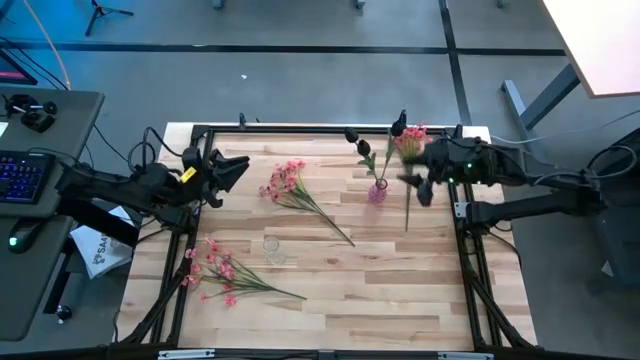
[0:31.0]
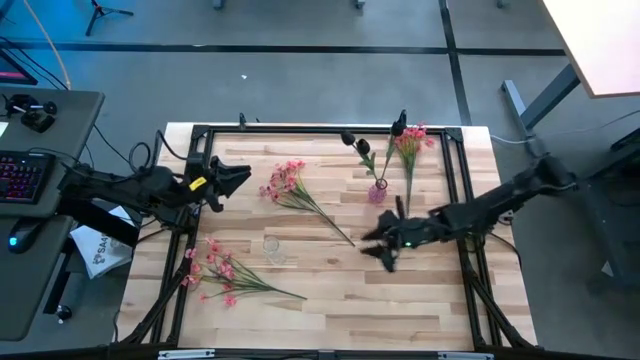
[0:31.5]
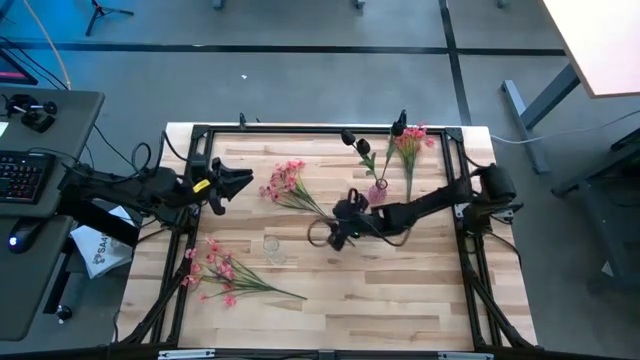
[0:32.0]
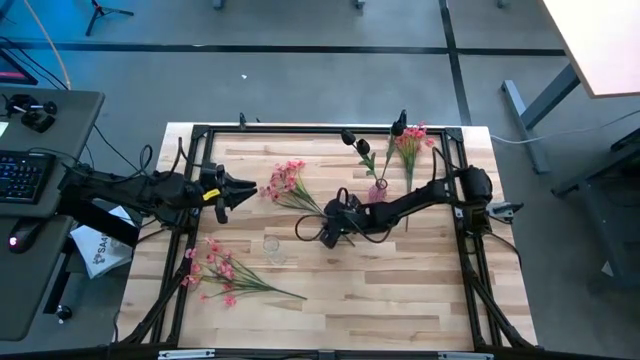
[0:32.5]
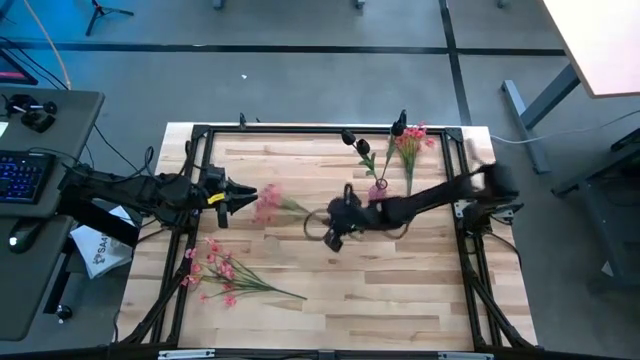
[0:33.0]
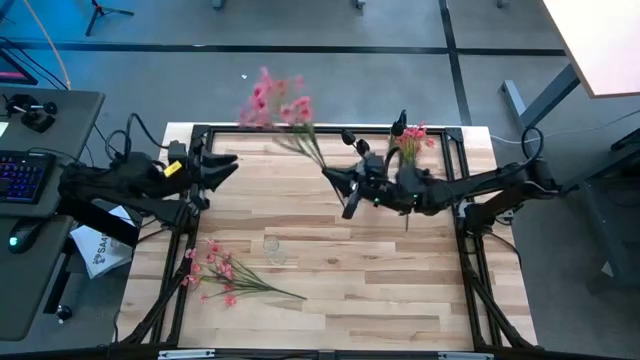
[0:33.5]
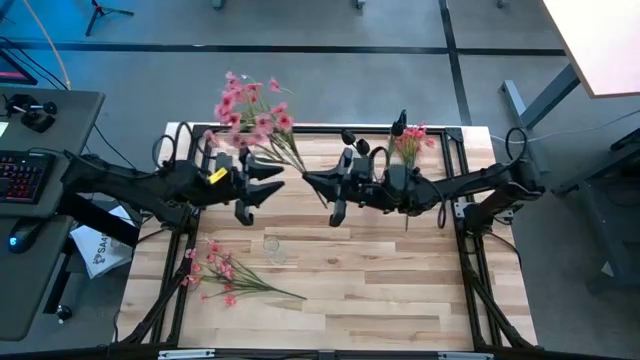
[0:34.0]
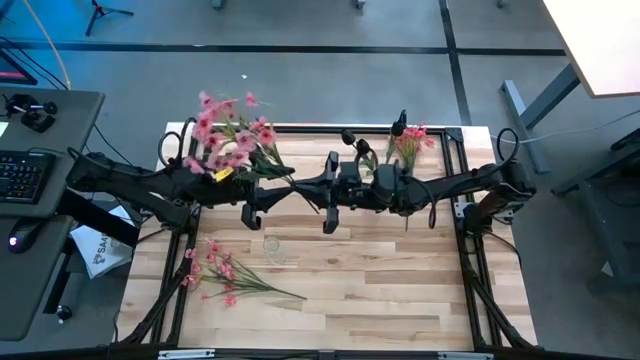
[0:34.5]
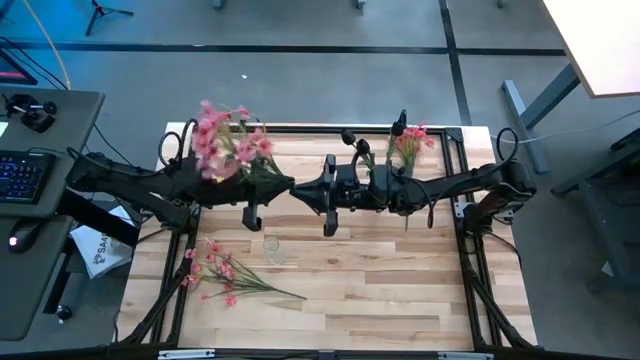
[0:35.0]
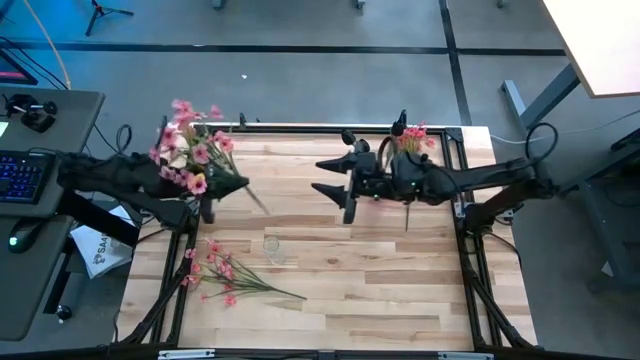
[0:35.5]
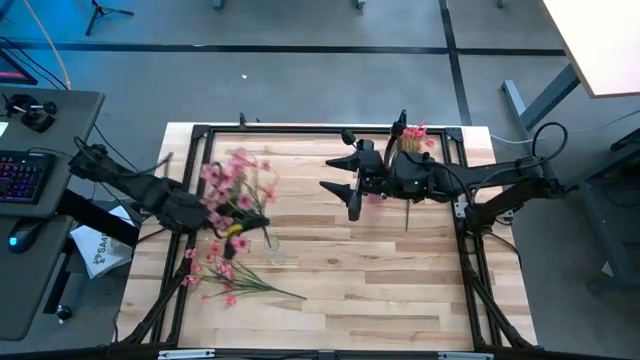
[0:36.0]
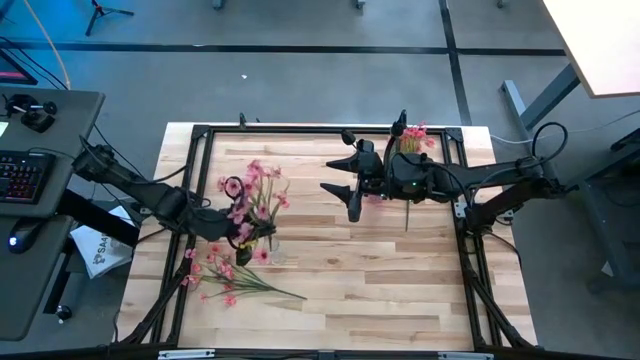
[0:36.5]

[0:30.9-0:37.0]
Task: Sort flowers into vase by color
Put the center pink flowers into the transparent vase

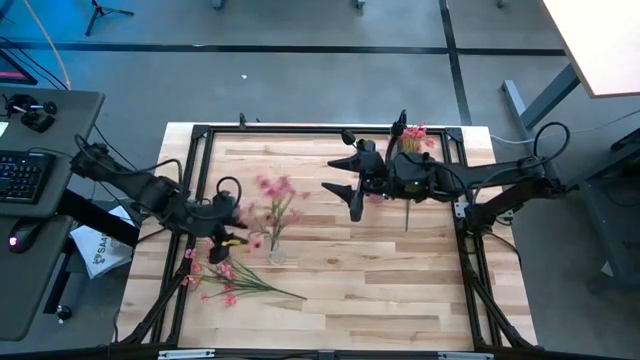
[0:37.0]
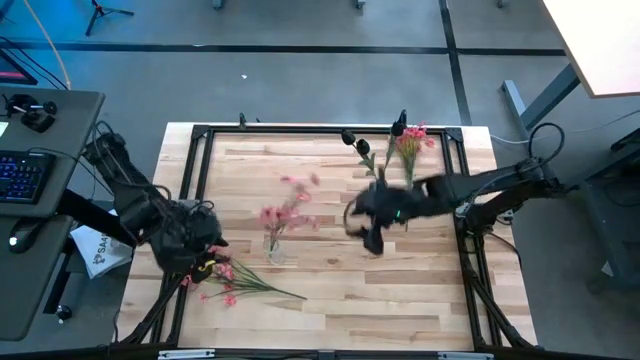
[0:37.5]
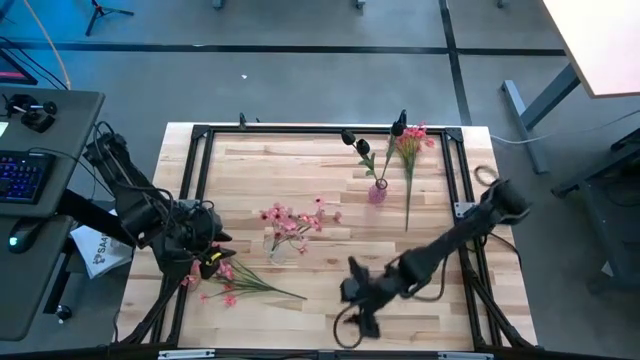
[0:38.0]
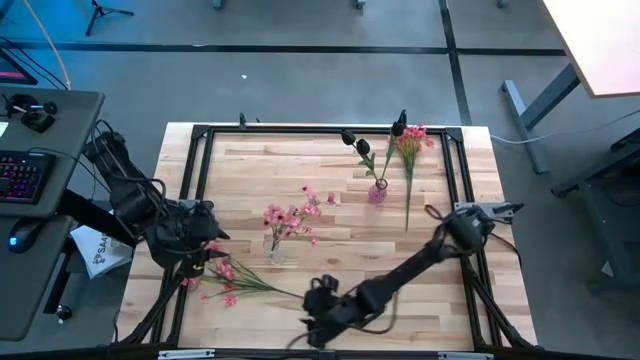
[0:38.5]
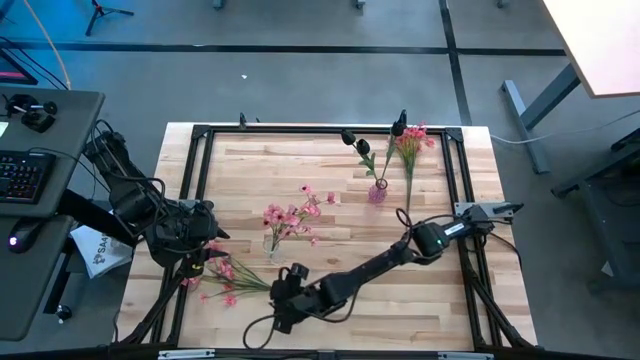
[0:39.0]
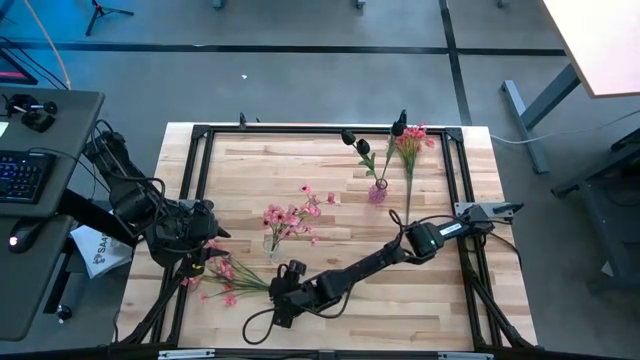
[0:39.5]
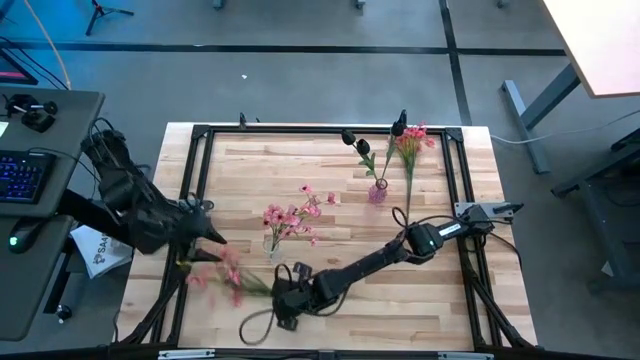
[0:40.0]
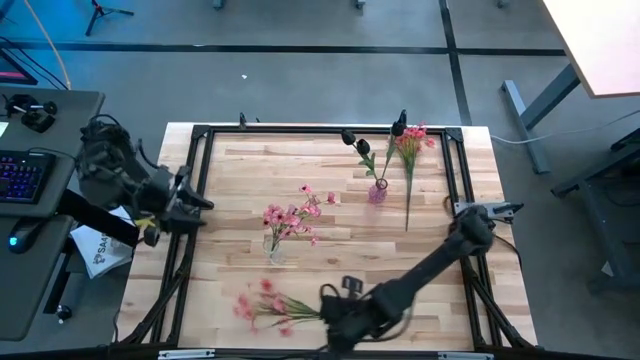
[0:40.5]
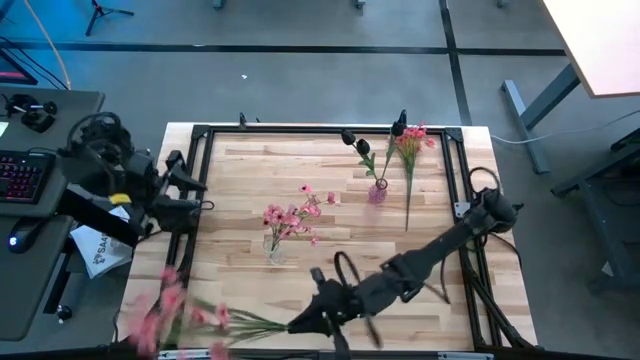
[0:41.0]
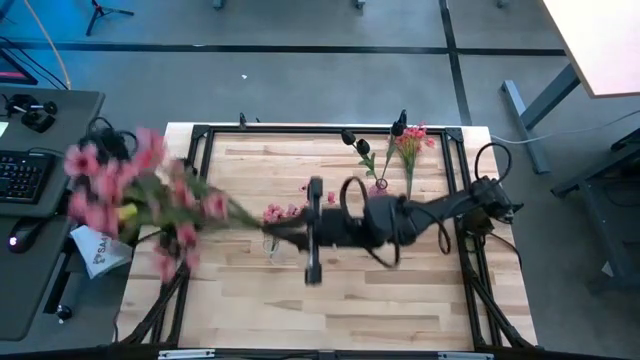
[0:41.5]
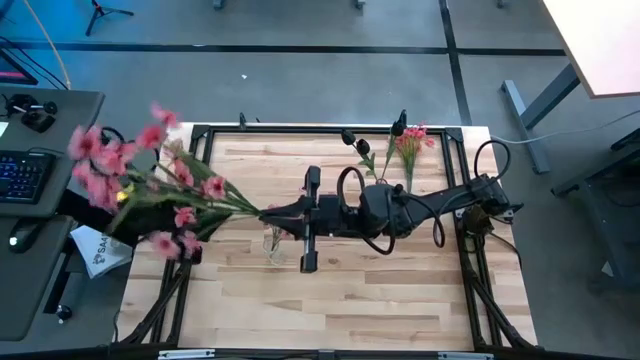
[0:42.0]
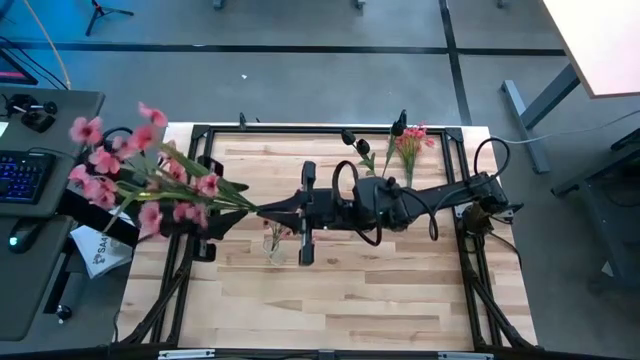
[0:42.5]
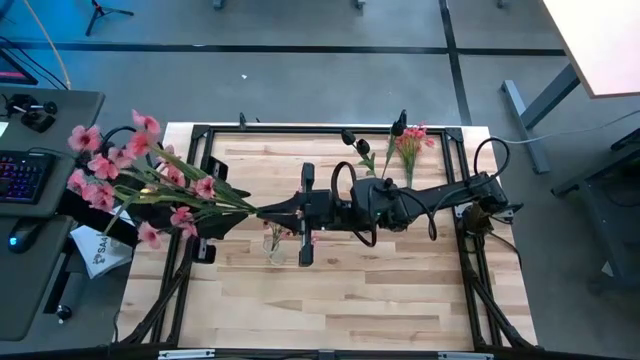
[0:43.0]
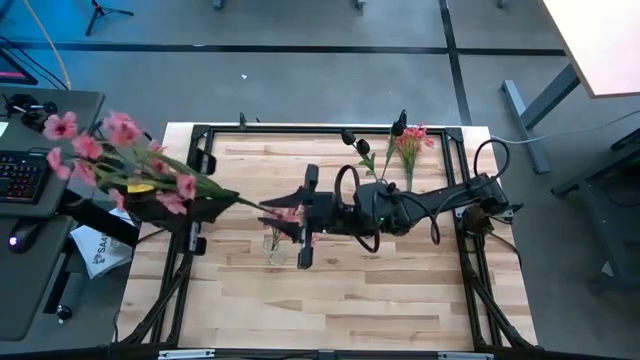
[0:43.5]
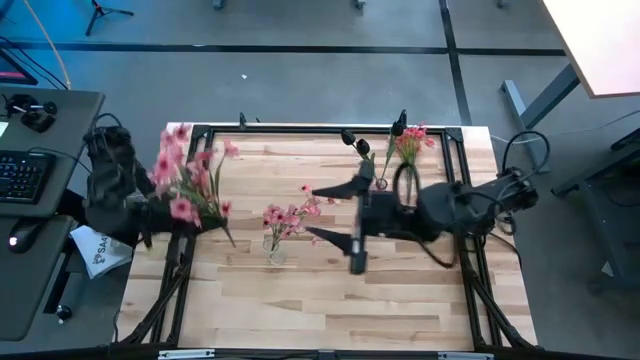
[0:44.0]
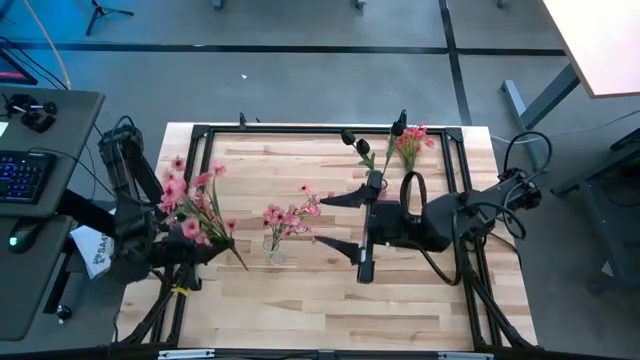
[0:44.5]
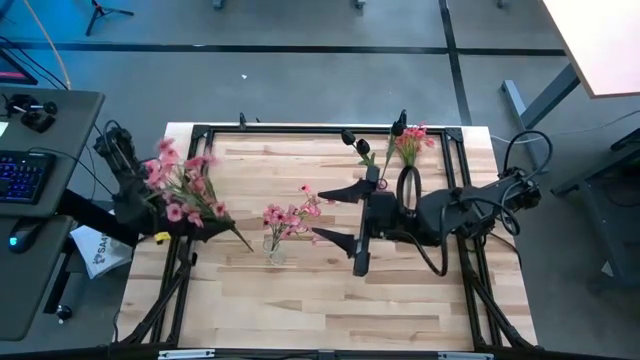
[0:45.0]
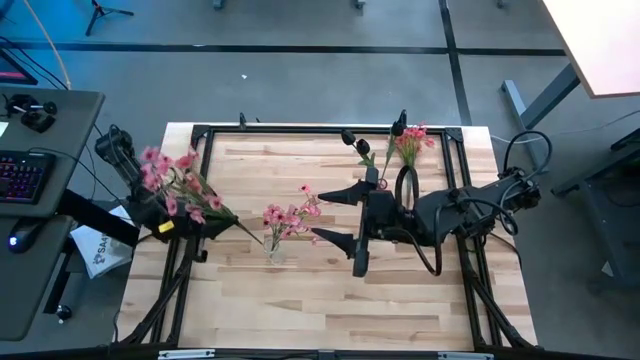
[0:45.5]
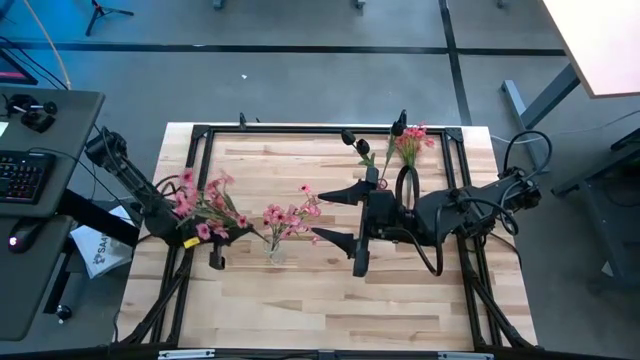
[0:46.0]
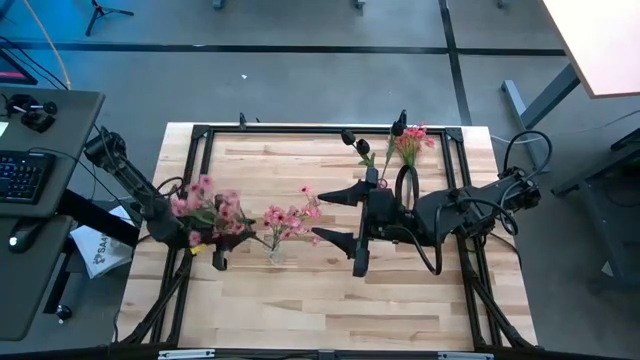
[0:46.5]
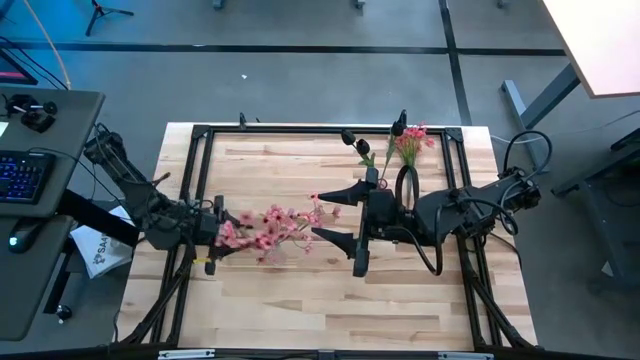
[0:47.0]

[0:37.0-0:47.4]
Put the bottom pink flowers into the transparent vase

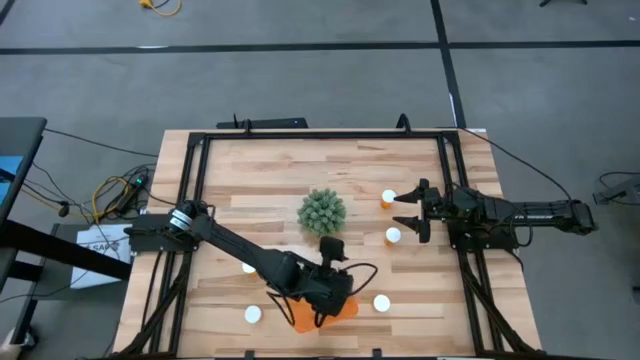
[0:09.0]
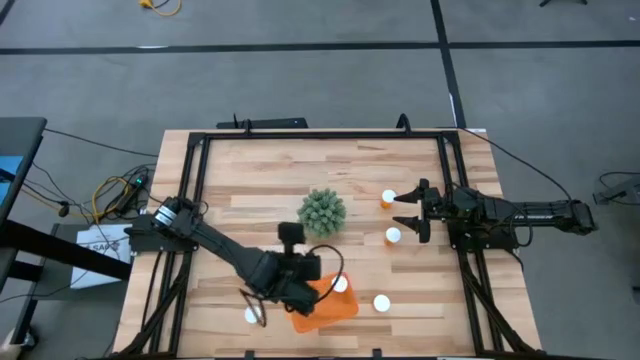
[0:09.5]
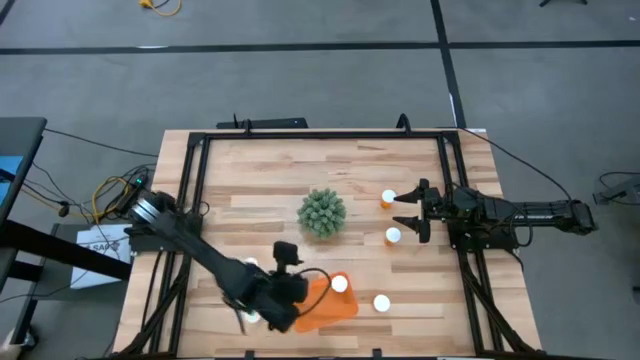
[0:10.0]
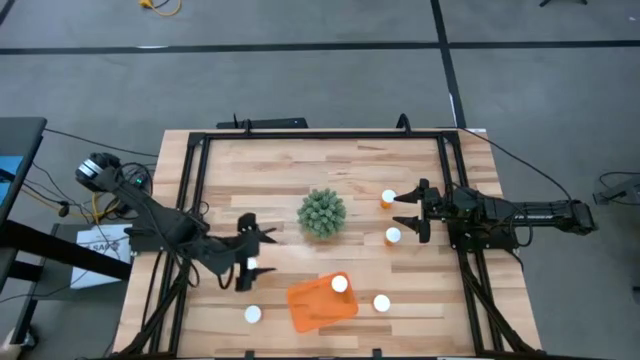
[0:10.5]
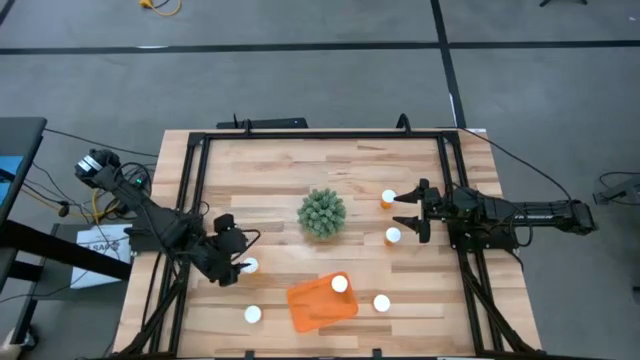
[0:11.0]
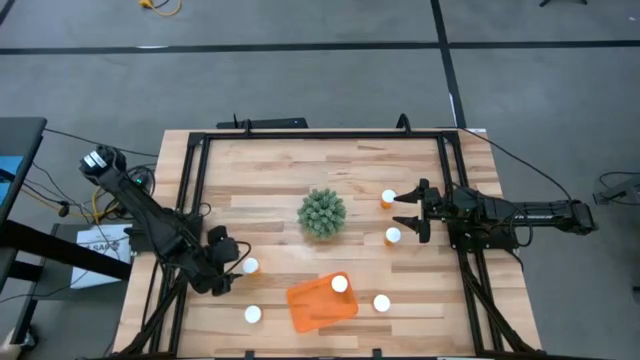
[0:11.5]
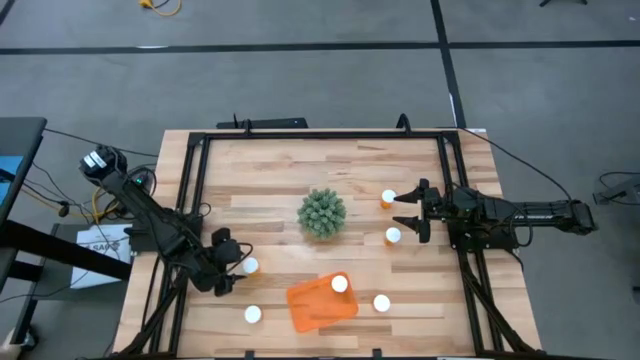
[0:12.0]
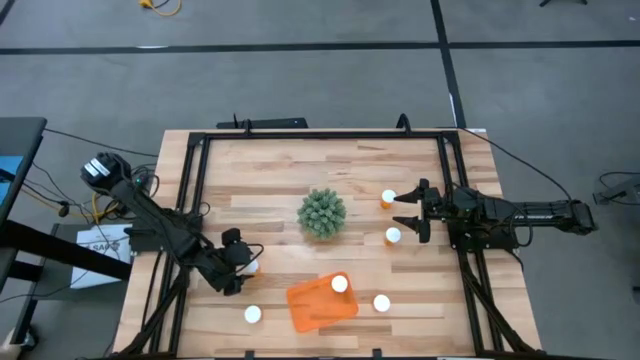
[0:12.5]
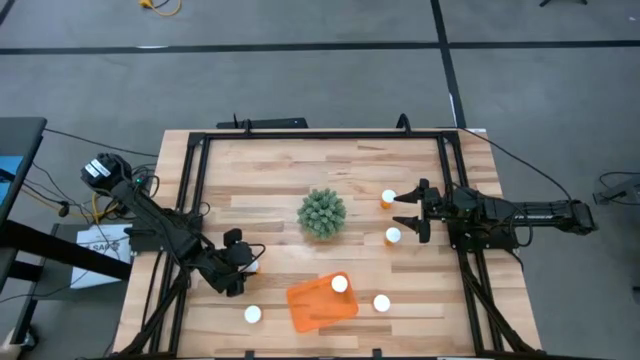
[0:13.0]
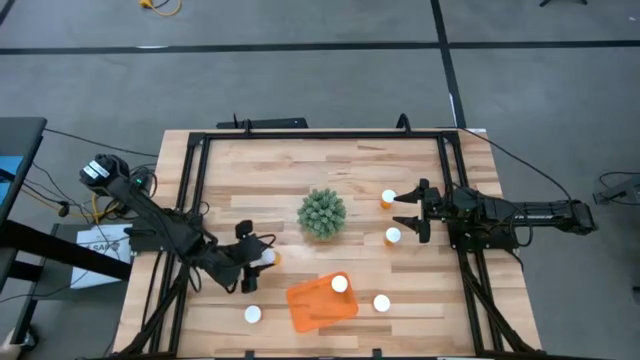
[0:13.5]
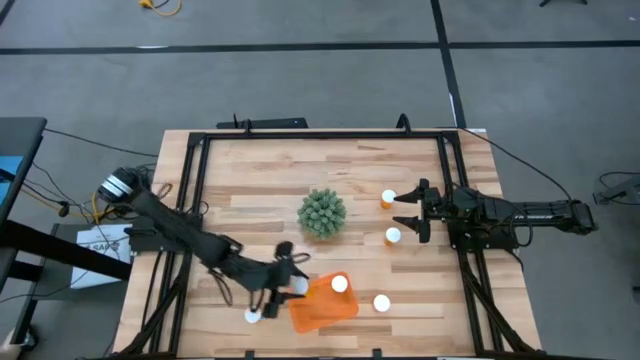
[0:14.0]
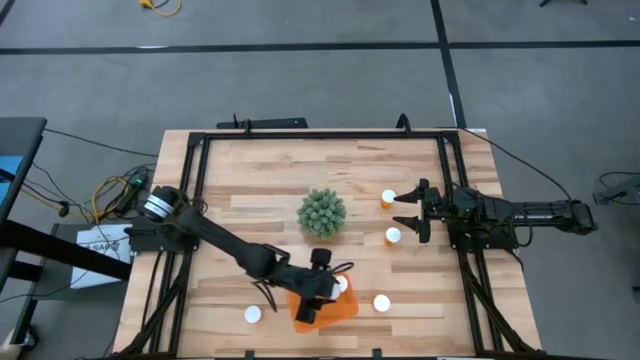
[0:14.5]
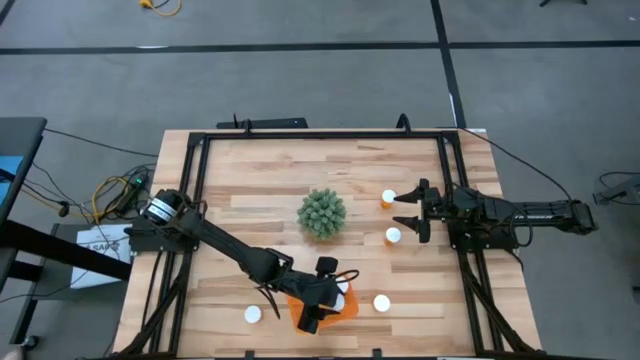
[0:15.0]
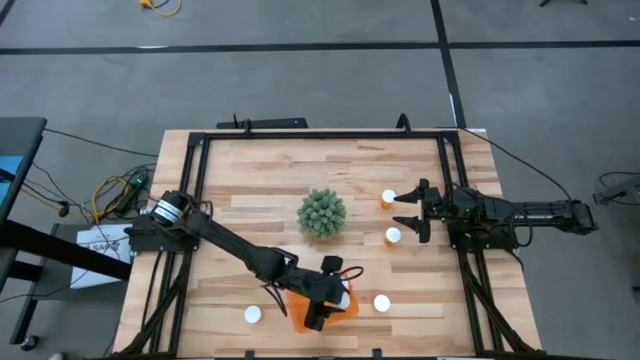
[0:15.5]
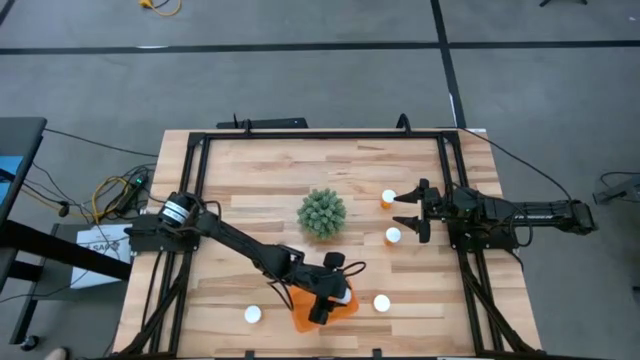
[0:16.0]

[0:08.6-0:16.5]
Task: Pick and place pill bottles into a basket
Put the orange pill bottle into the orange bin
